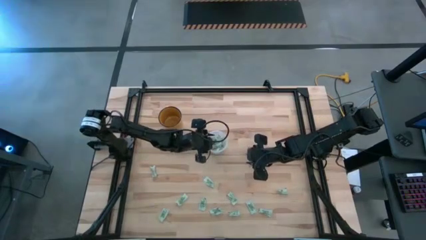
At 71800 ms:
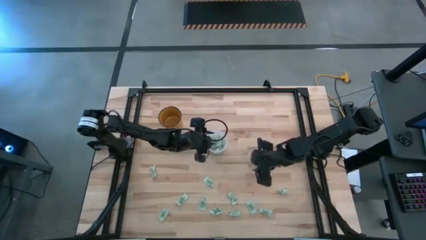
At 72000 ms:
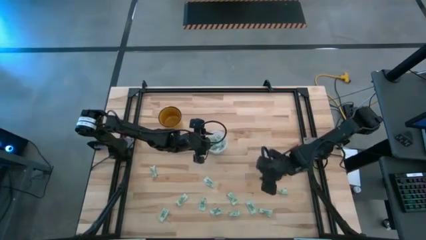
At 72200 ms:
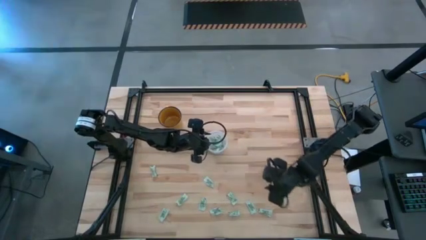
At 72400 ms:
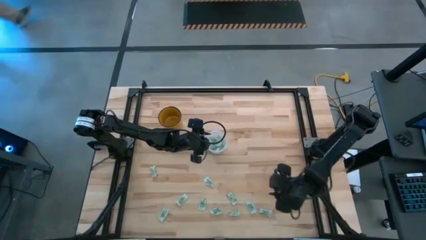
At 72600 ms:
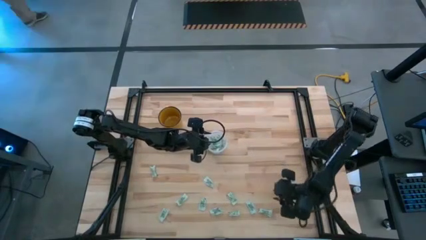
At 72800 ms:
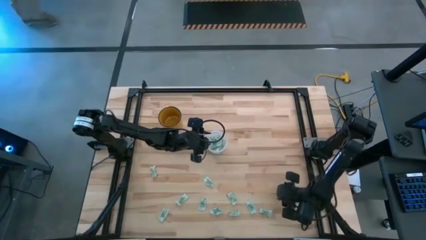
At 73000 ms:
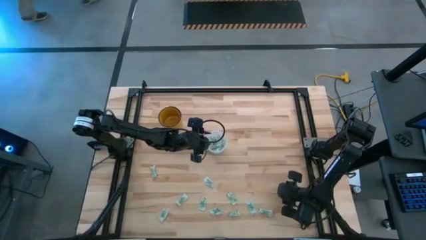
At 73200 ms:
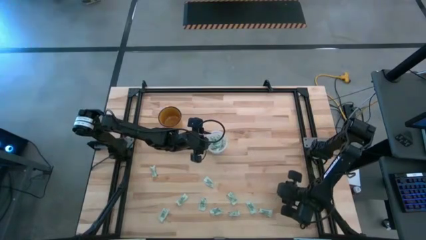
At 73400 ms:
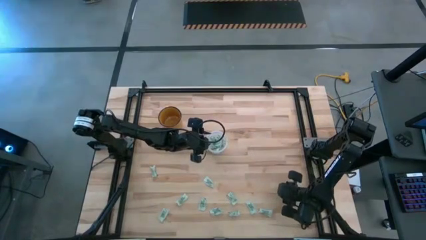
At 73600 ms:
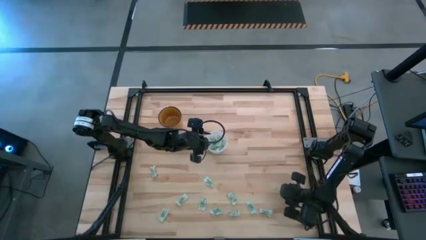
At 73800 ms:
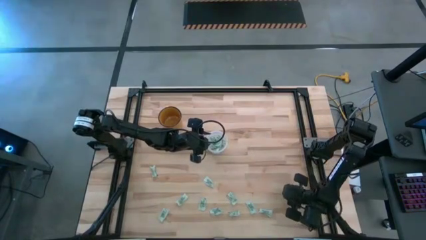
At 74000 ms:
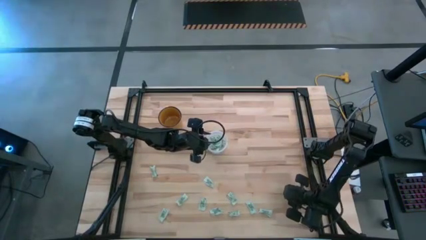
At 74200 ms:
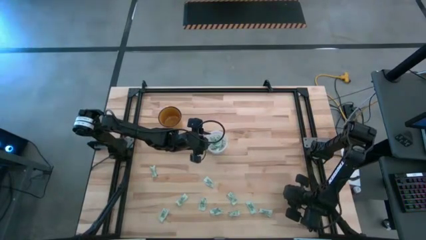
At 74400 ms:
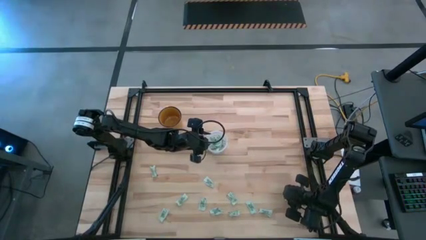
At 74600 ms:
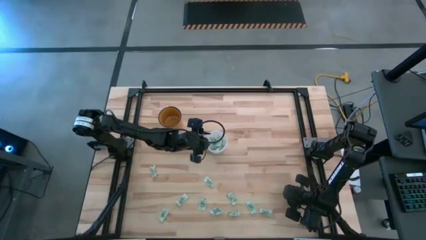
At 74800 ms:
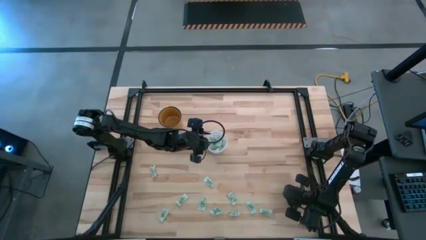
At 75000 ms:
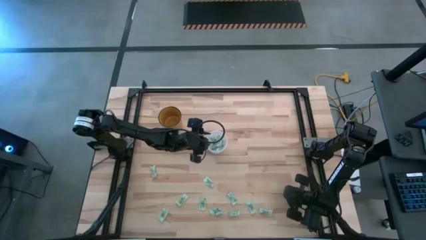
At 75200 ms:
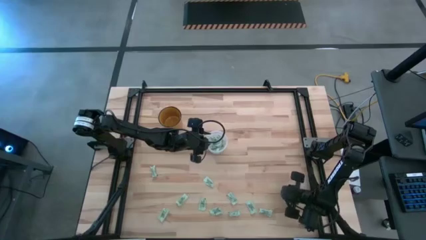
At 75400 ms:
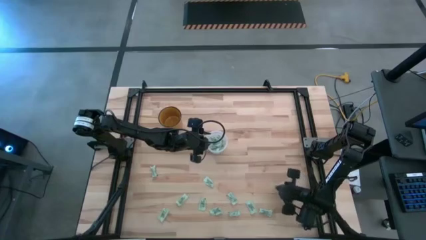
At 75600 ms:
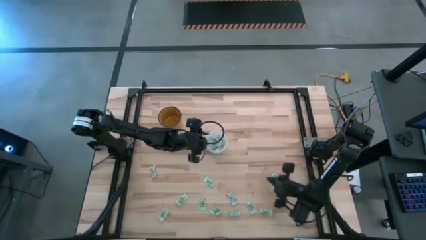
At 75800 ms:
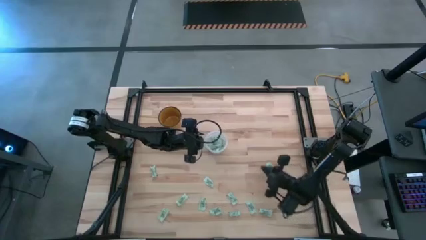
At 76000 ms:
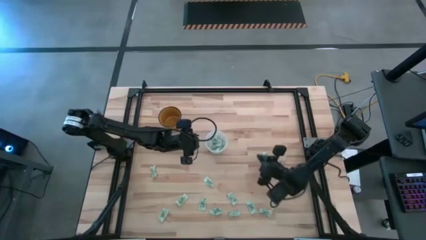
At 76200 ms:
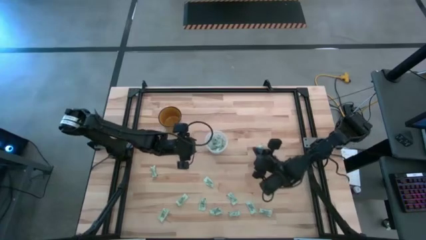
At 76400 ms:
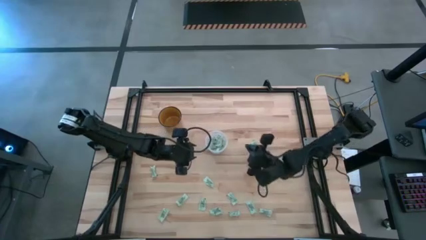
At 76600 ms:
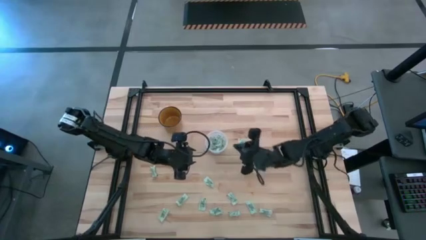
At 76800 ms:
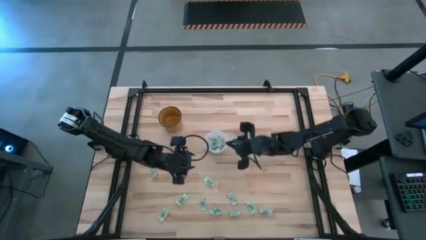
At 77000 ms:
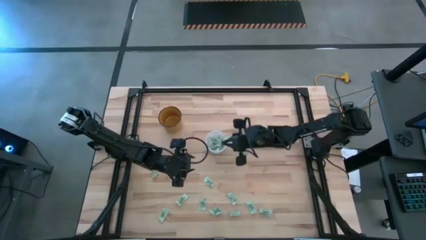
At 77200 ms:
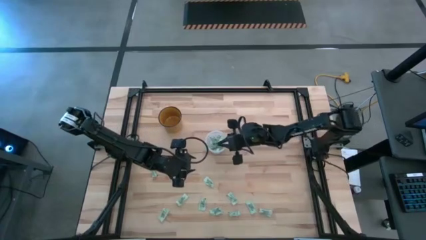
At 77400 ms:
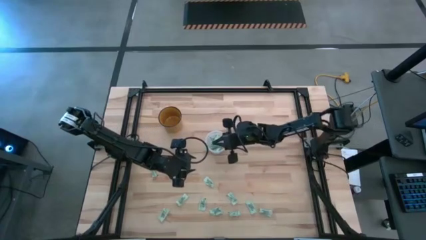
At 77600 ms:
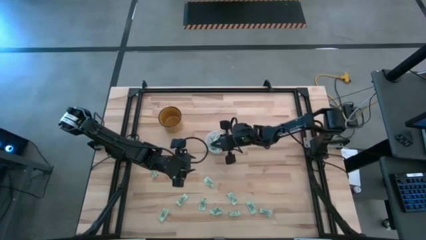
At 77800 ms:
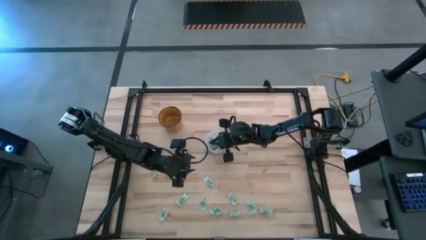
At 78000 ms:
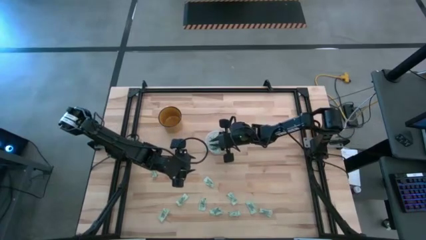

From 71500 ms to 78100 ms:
Task: Pick and place Stevia / Truvia into bins
Put the stevia packet into the transparent container

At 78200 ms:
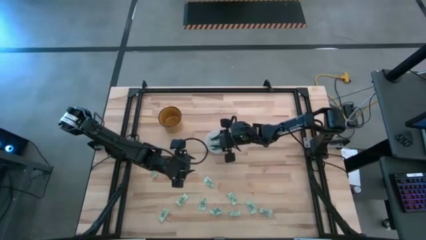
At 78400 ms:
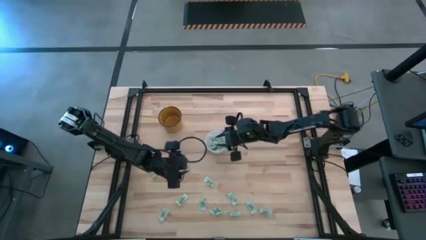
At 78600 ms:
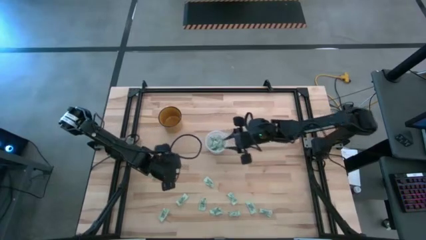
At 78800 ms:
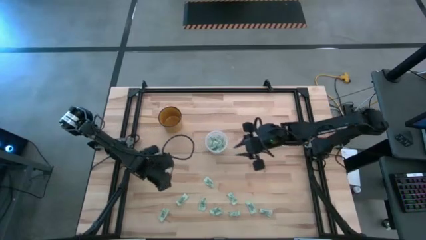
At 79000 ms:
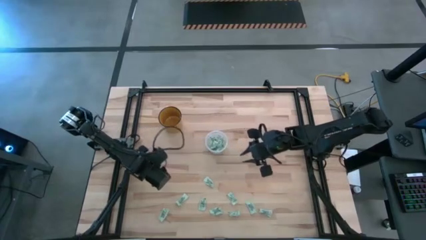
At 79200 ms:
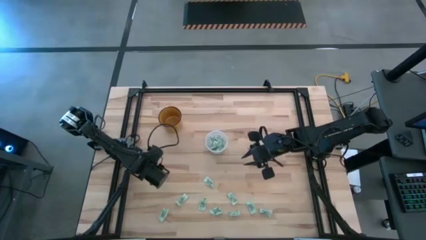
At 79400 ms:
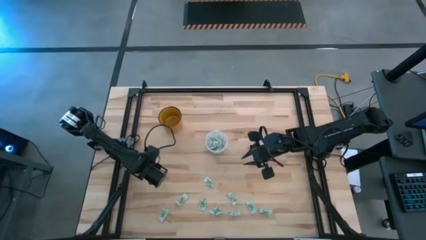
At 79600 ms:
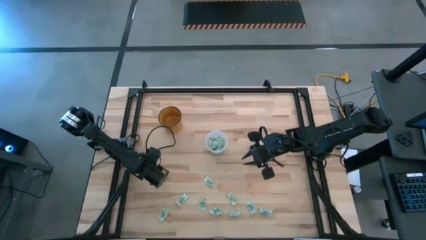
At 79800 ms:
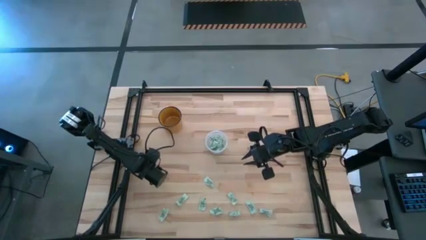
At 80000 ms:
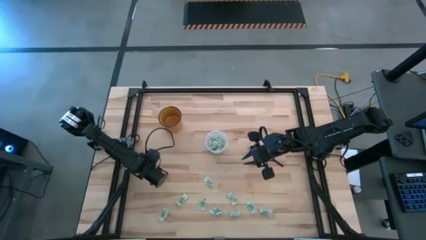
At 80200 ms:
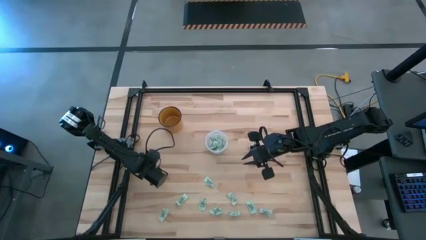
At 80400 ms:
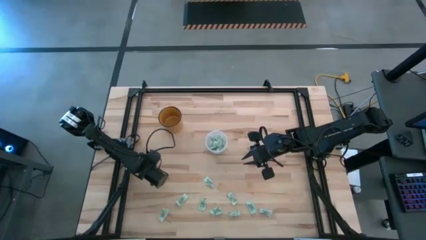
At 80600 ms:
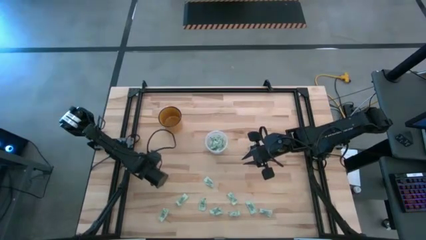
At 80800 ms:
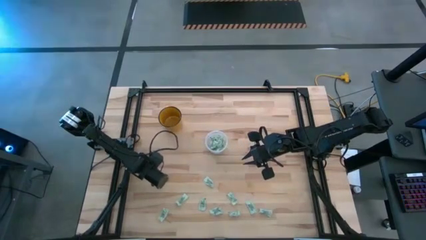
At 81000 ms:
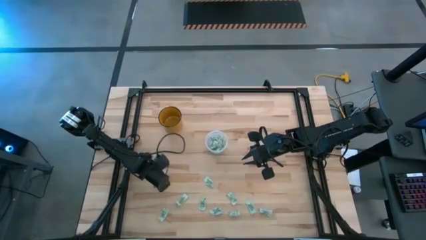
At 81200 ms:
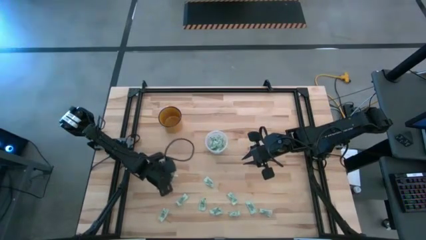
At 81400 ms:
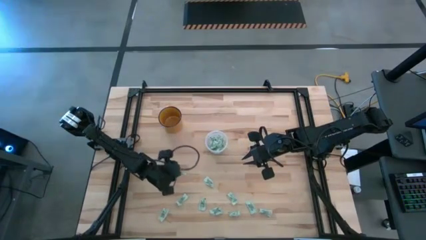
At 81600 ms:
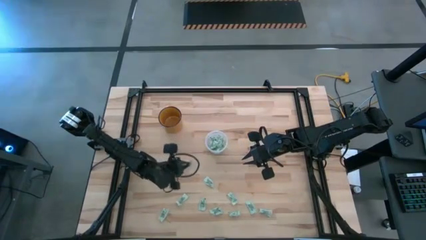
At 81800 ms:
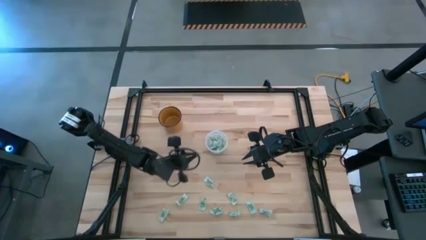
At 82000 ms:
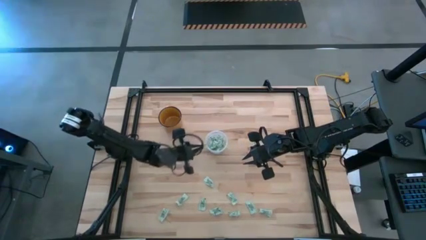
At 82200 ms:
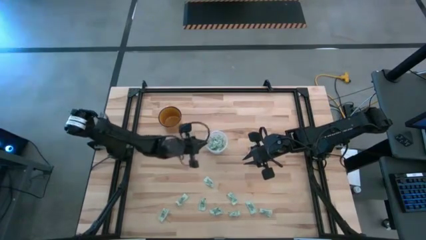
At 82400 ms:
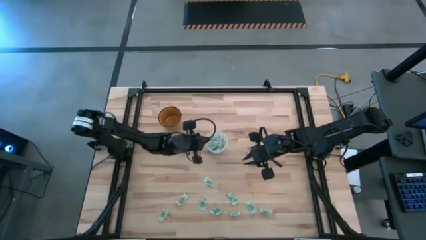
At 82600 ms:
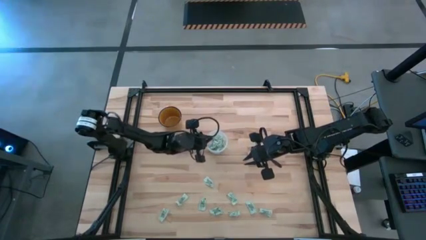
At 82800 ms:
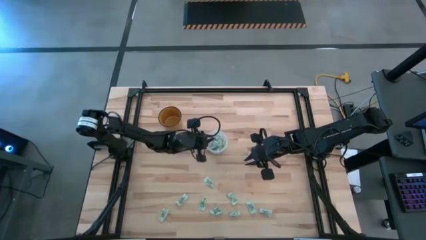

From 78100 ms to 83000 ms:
Put the stevia packet into the transparent container

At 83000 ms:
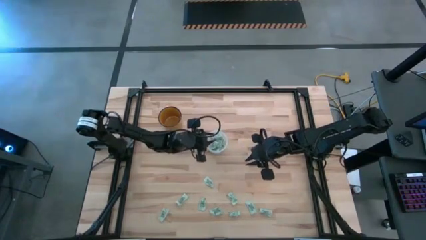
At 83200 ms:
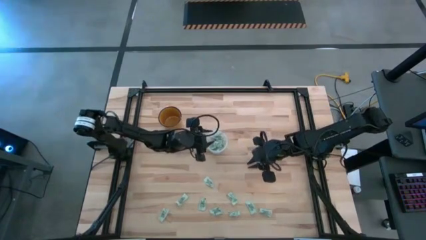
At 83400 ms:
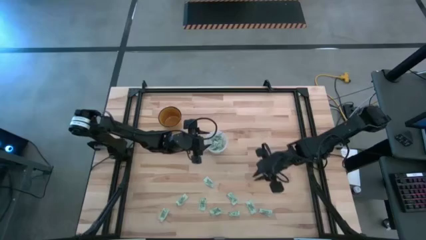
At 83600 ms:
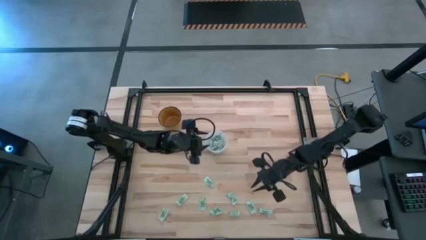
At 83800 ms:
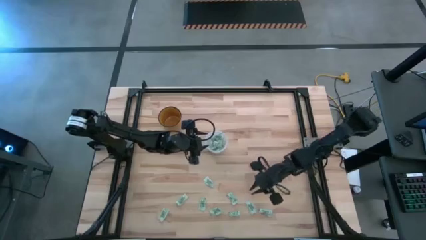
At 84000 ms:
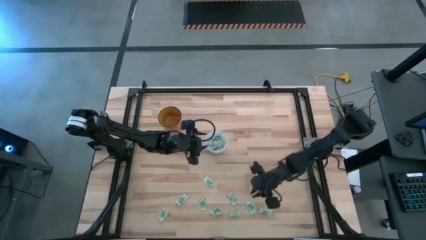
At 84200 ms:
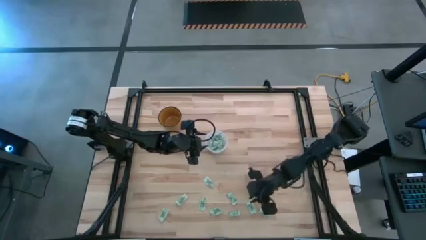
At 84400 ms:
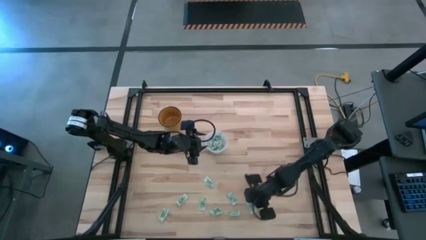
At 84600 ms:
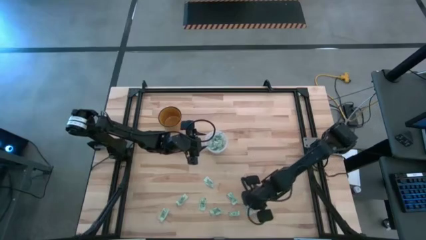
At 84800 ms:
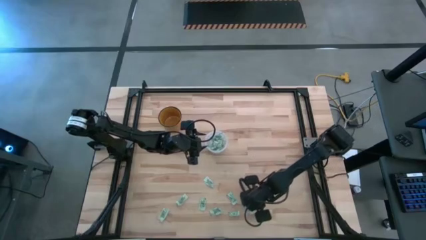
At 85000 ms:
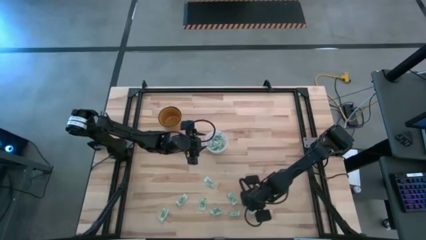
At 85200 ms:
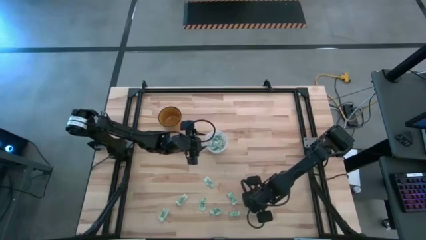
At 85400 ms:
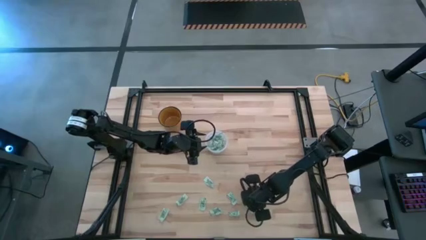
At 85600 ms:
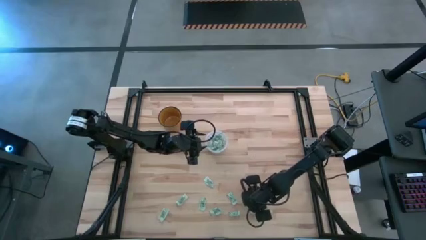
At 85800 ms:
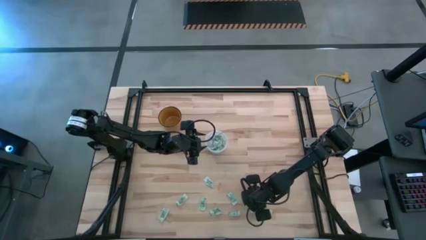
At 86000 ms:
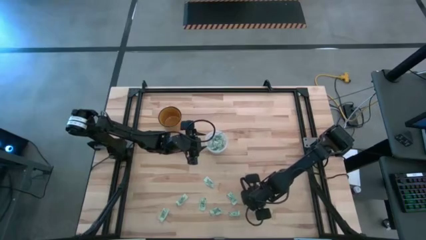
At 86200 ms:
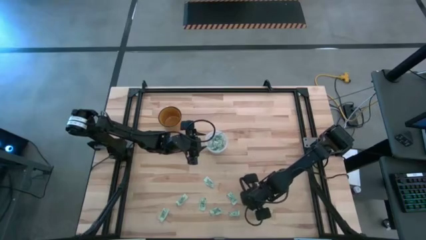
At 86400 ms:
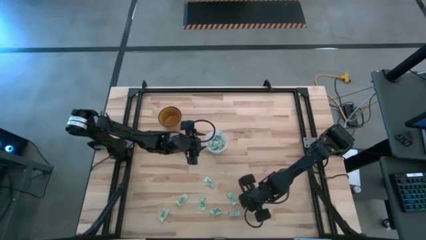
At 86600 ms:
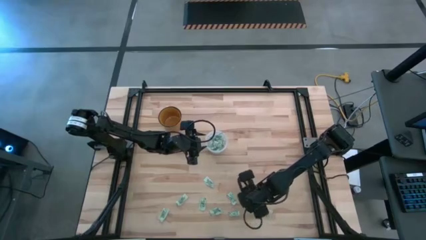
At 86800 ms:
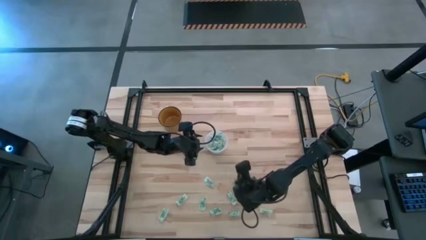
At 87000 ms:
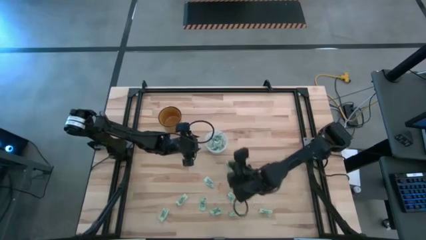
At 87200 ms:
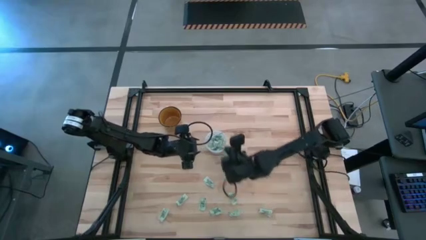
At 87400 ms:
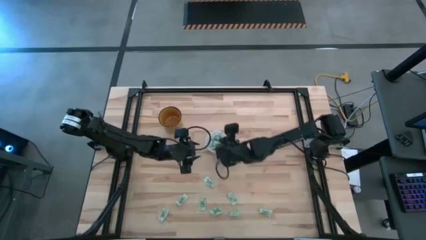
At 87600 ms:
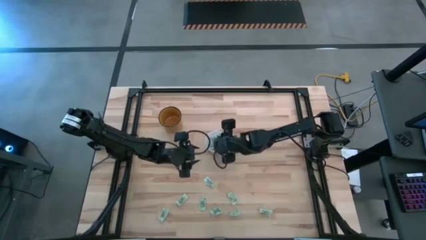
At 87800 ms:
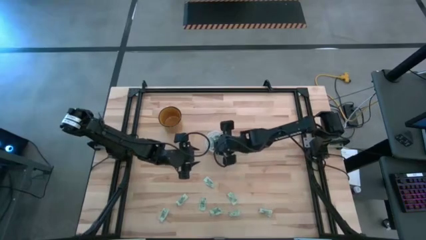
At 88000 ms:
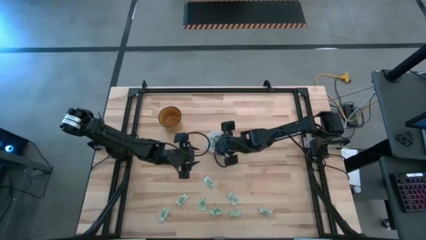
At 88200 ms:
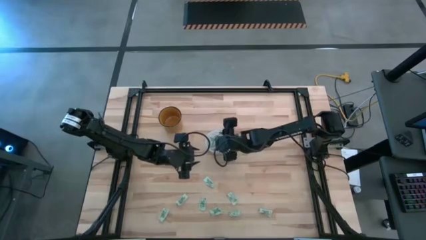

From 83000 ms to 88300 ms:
Put the stevia packet into the transparent container
